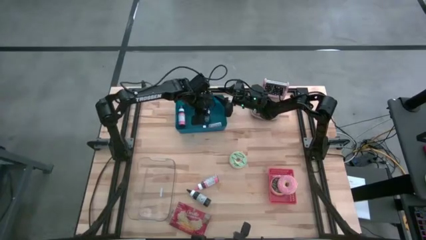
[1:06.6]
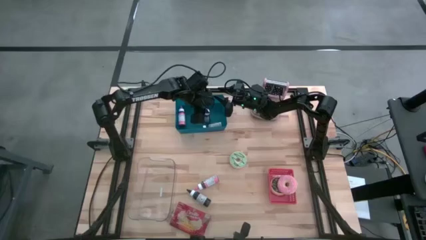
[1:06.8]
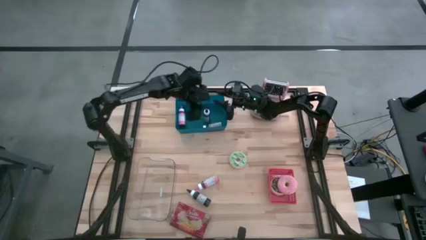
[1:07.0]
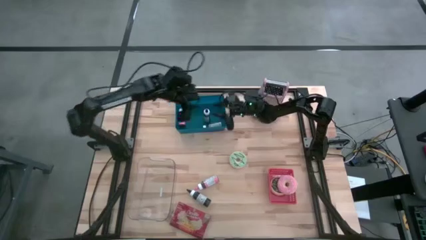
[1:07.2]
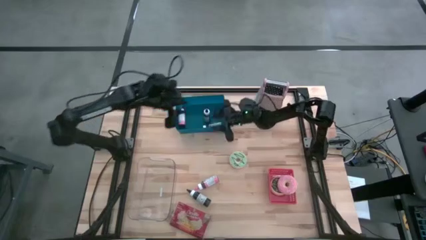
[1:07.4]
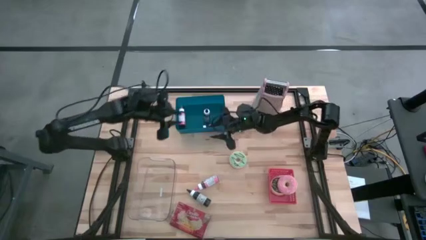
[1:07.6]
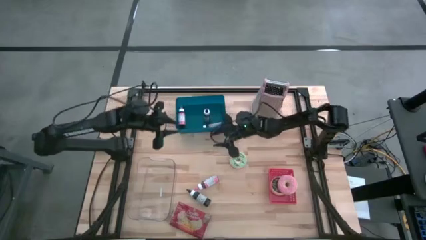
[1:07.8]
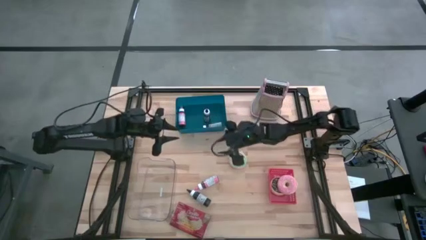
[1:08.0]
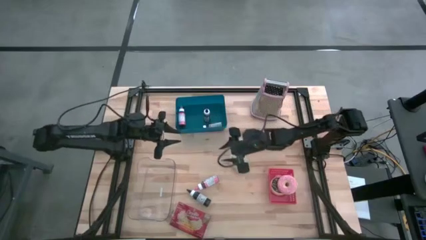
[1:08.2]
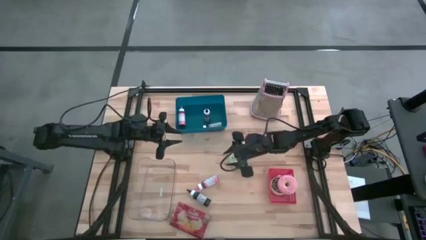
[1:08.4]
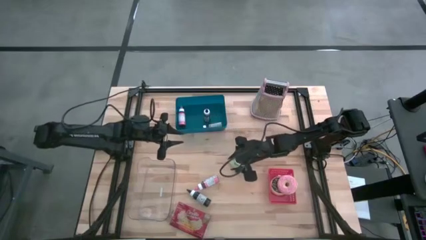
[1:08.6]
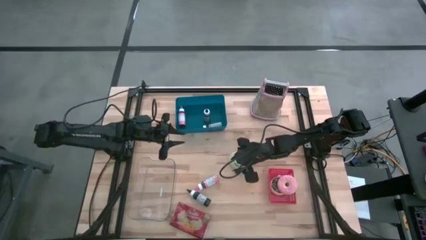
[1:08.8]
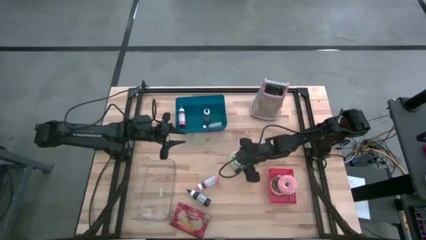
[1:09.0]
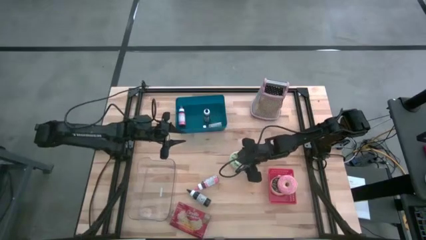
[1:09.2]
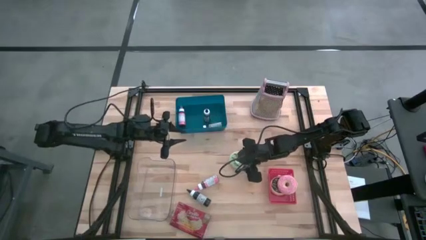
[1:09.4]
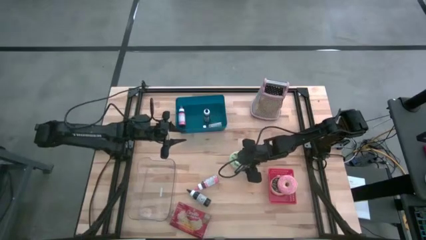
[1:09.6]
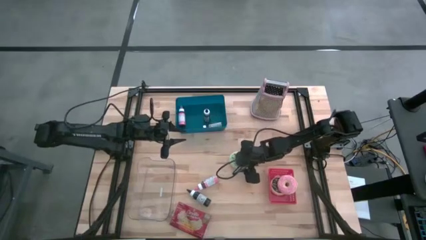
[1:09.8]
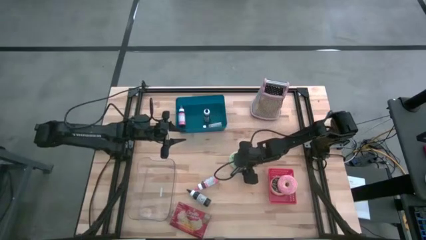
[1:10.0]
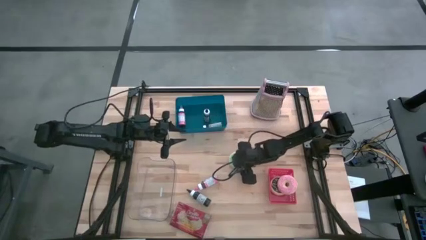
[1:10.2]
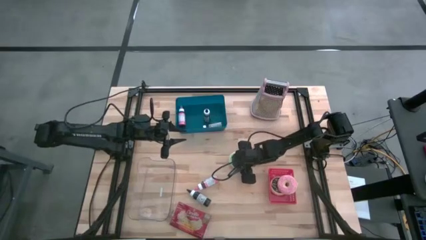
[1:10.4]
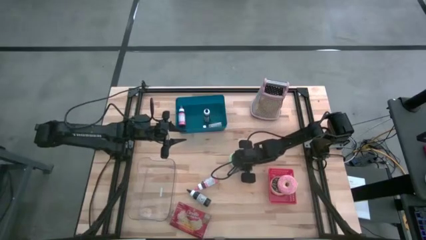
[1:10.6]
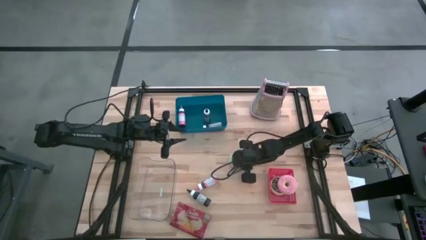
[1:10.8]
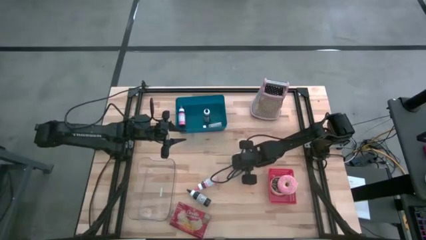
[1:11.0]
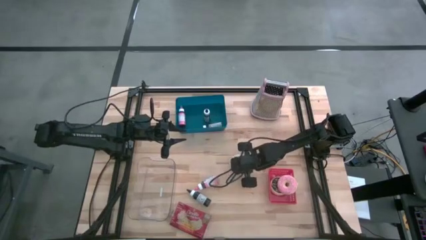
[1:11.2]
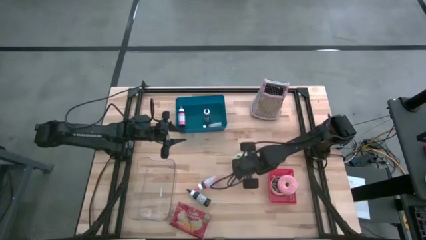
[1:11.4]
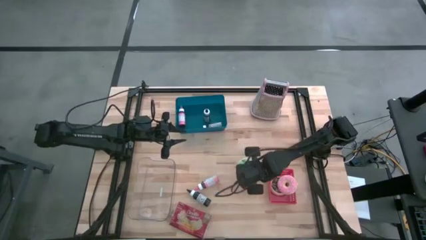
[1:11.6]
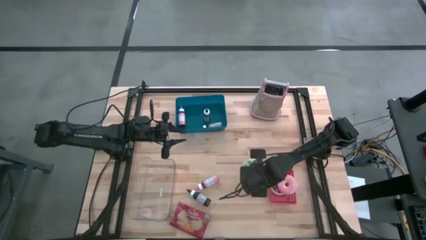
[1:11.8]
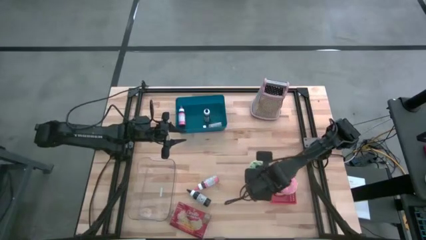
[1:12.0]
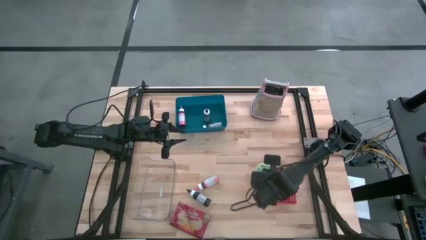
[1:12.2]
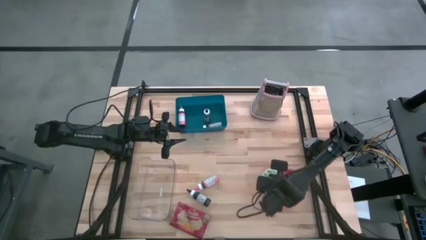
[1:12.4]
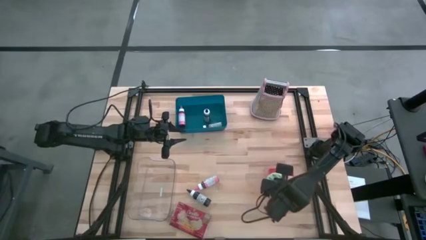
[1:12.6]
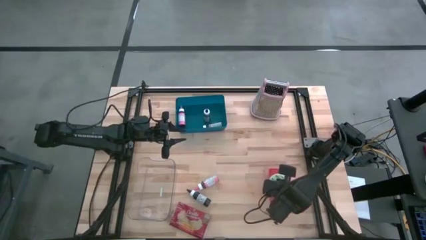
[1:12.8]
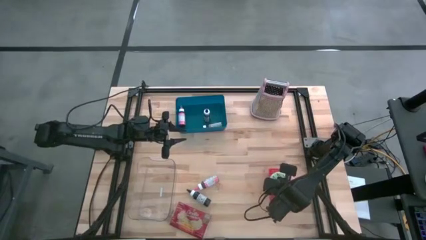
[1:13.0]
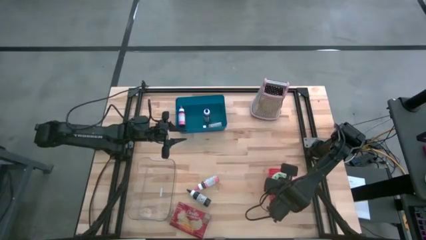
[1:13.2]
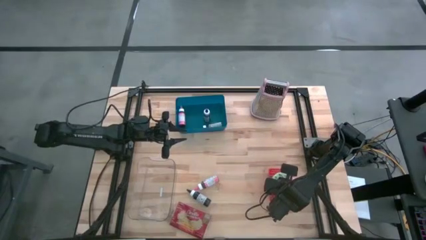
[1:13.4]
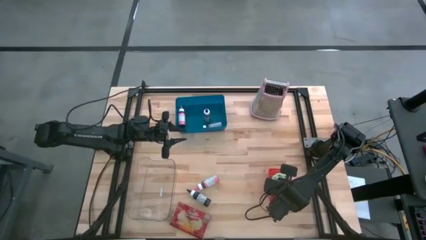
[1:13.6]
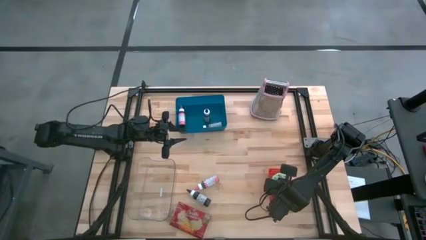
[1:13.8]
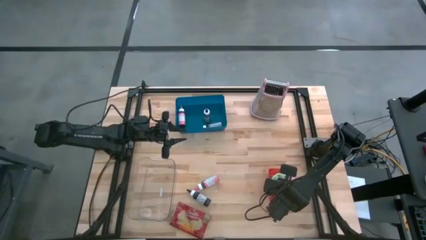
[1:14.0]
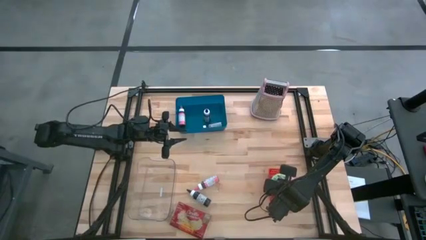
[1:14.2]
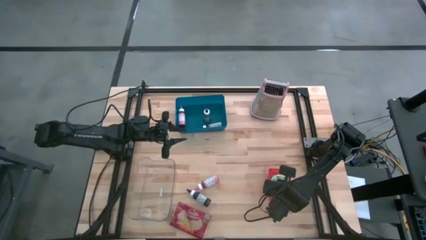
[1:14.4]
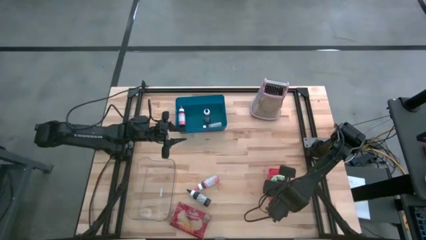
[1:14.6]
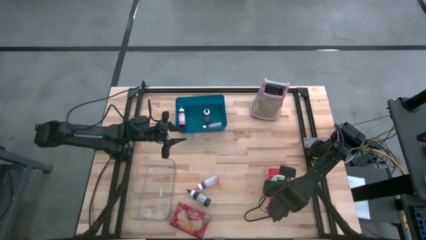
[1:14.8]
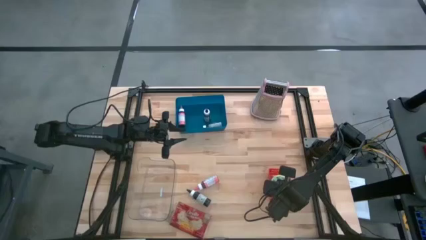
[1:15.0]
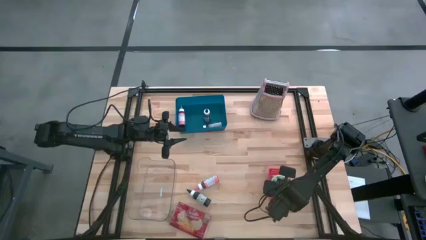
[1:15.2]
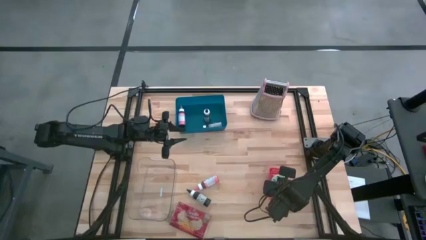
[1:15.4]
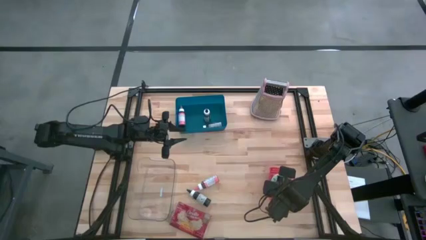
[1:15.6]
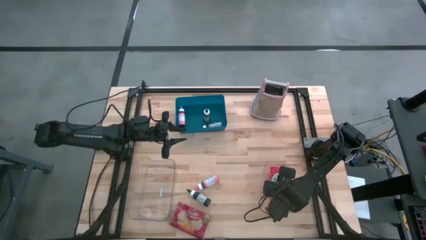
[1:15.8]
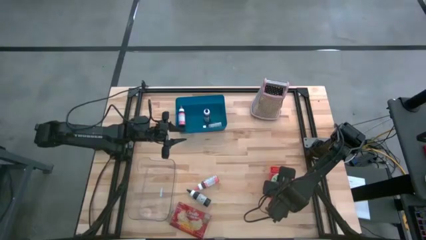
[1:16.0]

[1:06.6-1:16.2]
Task: Pick & Place Food Item
Put the green donut into the red basket

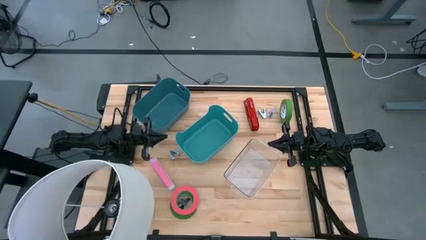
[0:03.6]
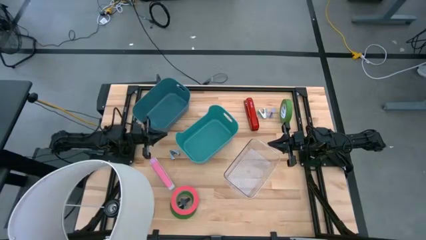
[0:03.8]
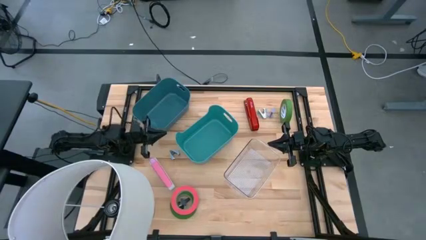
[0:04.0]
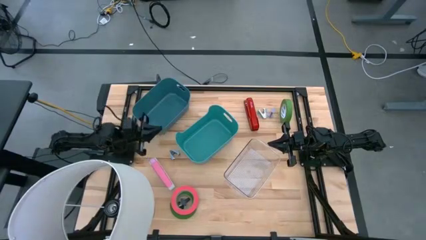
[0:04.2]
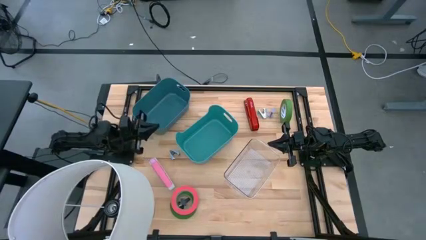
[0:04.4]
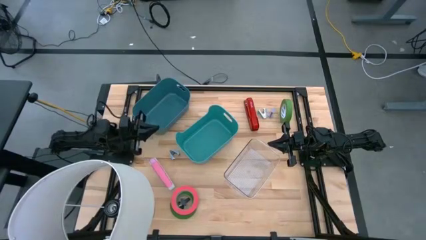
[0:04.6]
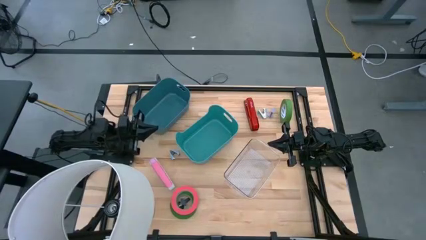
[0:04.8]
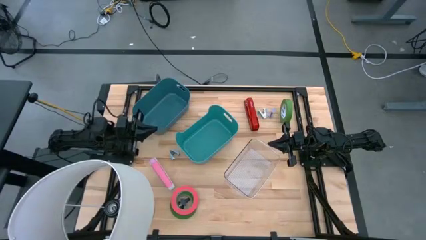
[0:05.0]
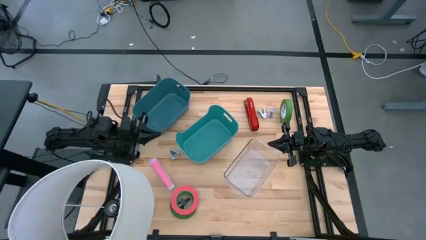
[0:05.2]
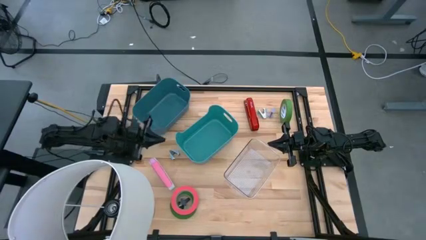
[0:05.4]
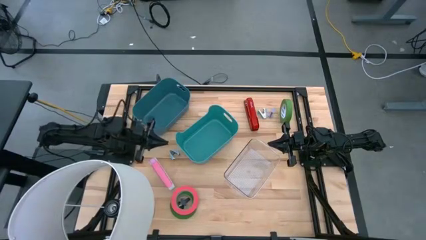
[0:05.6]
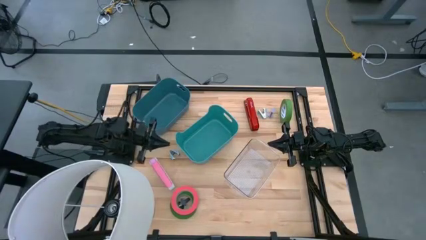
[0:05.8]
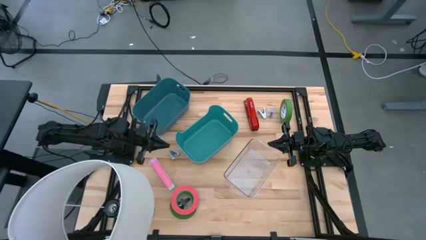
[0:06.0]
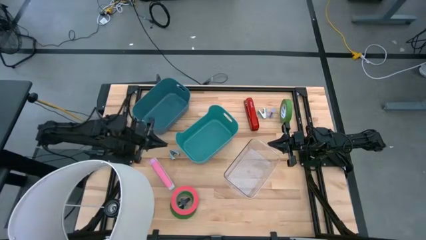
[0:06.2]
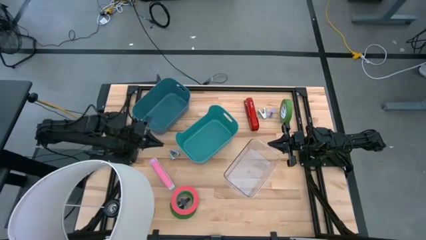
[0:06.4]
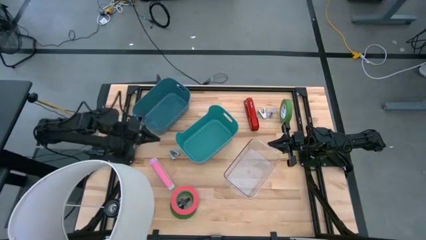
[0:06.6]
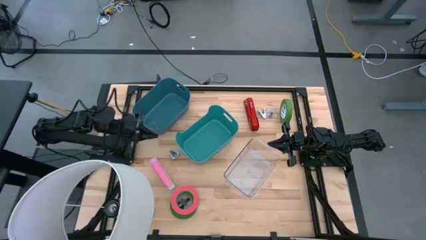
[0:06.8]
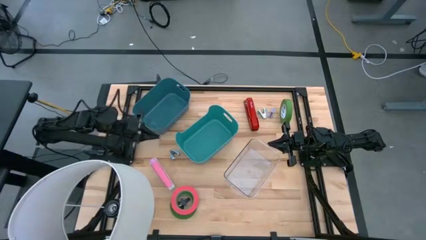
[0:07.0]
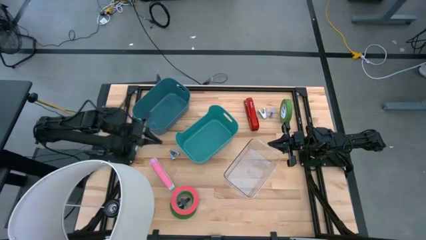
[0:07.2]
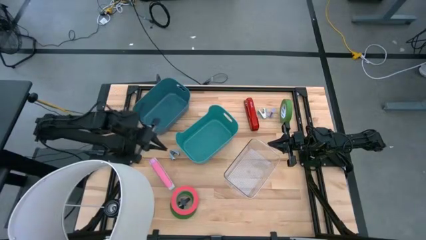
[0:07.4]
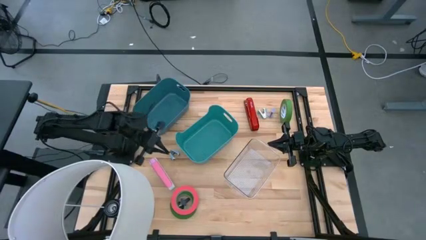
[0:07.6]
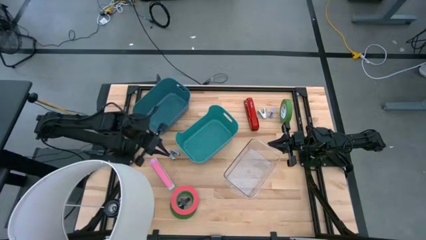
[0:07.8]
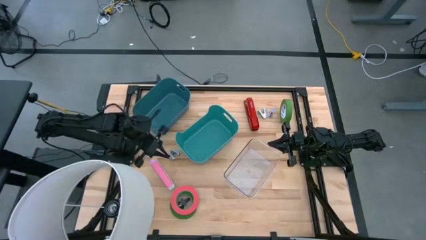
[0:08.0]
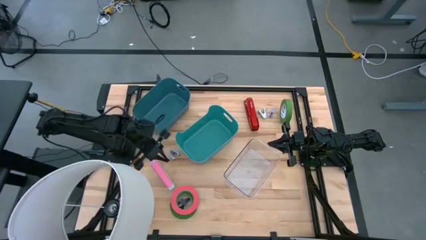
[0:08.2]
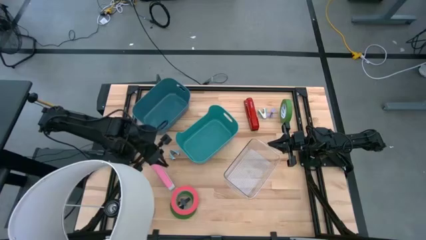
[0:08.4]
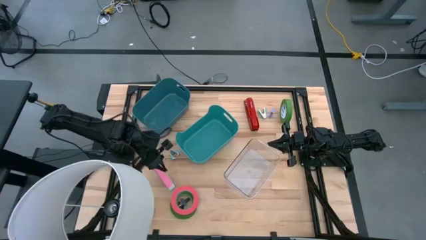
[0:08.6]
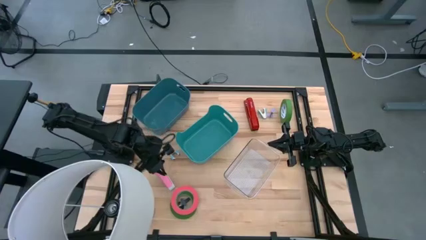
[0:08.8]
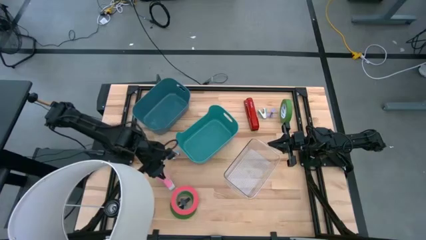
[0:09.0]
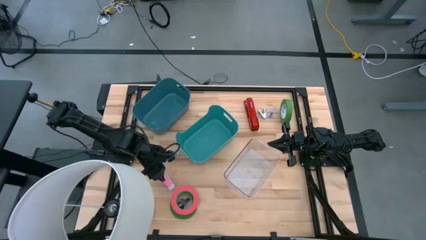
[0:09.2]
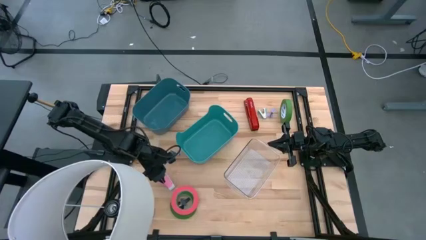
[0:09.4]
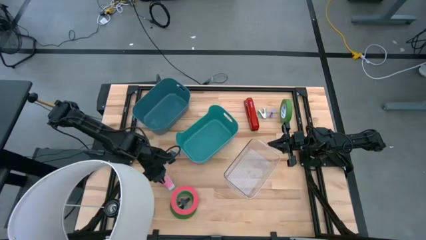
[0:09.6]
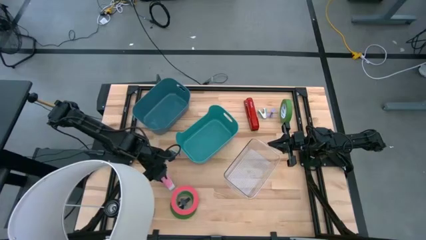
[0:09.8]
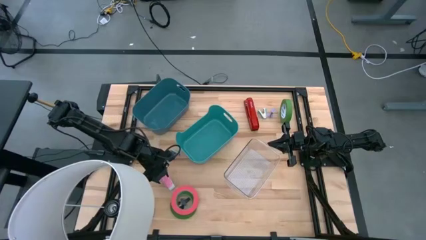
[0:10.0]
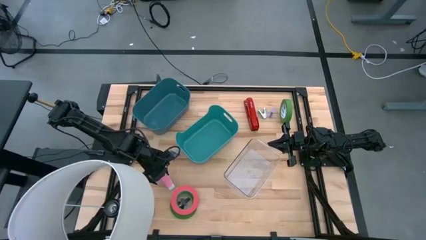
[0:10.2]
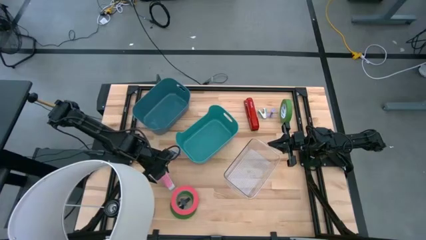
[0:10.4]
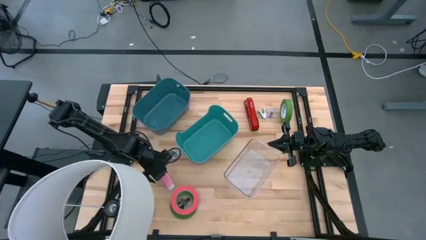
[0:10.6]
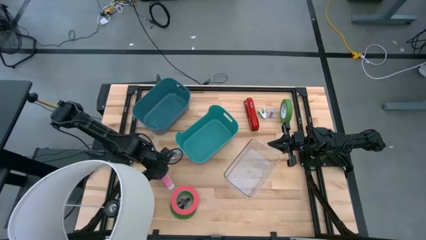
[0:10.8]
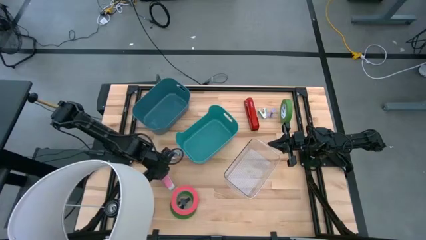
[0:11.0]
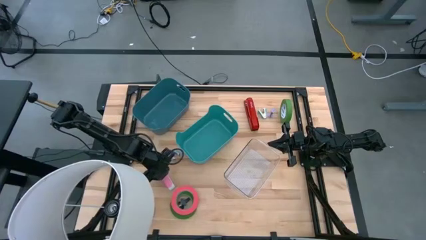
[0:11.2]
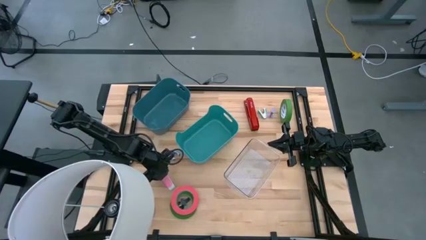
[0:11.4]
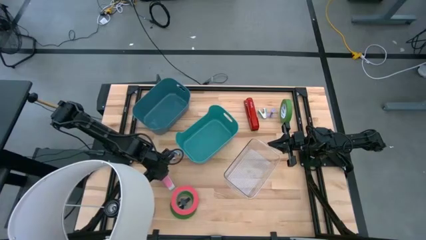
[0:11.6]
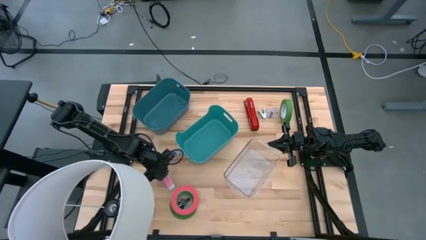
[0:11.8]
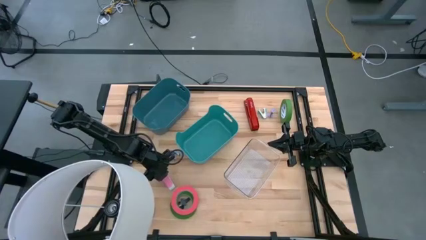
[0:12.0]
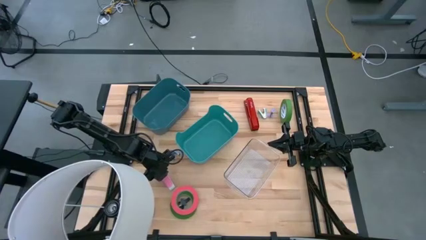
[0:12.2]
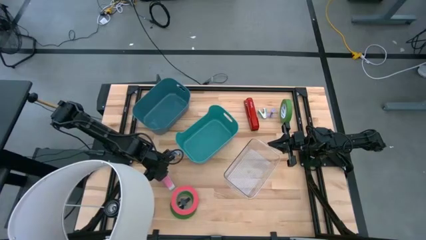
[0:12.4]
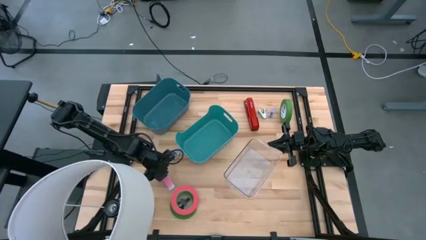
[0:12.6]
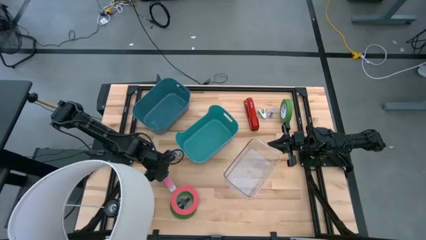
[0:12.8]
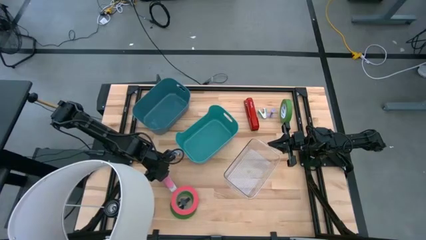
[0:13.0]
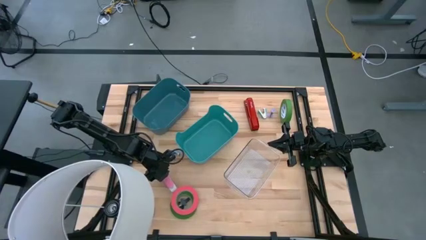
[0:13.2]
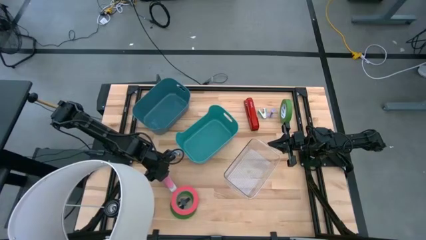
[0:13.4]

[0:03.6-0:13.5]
Task: Pick and place Stapler, Stapler remover, tape
Put the pink stapler into the green bin
